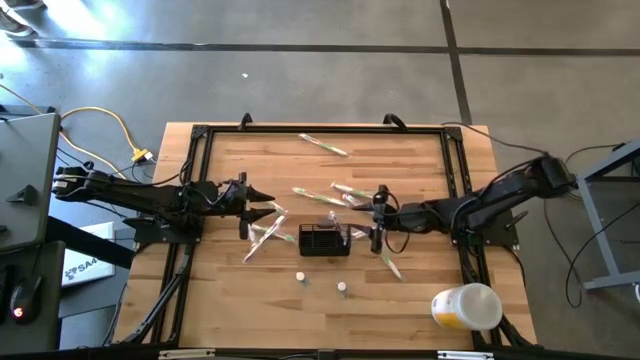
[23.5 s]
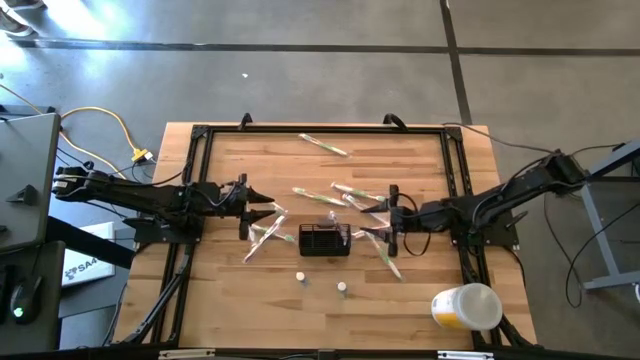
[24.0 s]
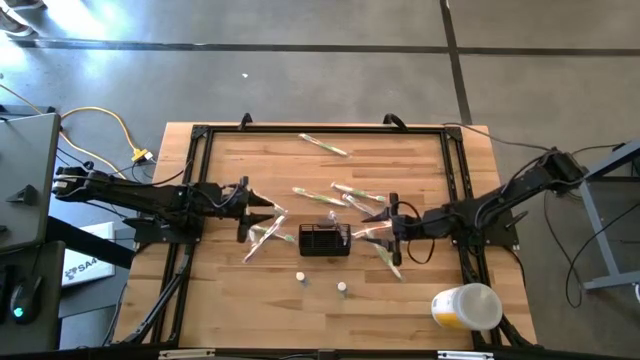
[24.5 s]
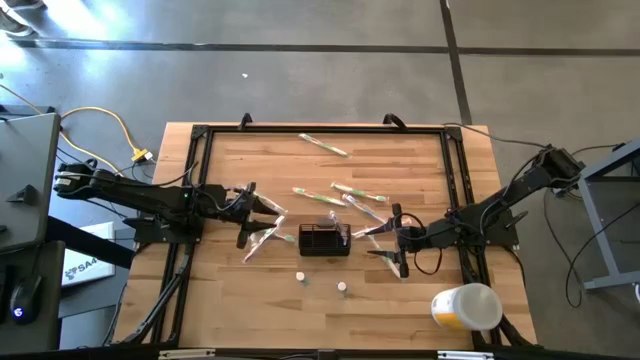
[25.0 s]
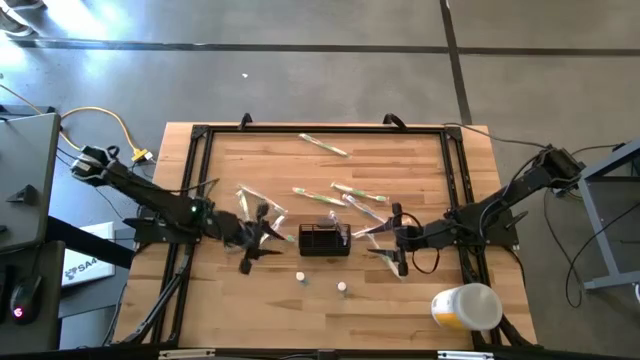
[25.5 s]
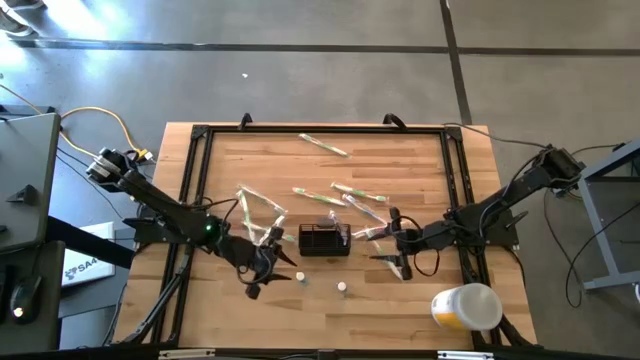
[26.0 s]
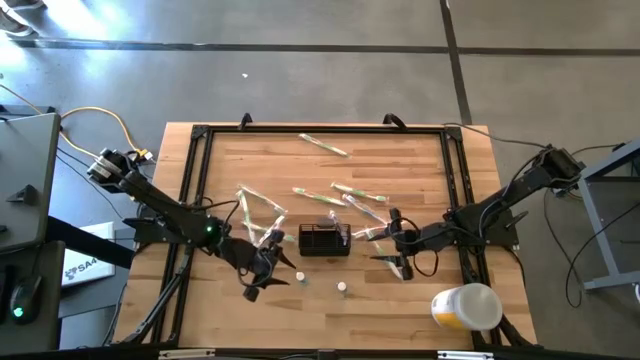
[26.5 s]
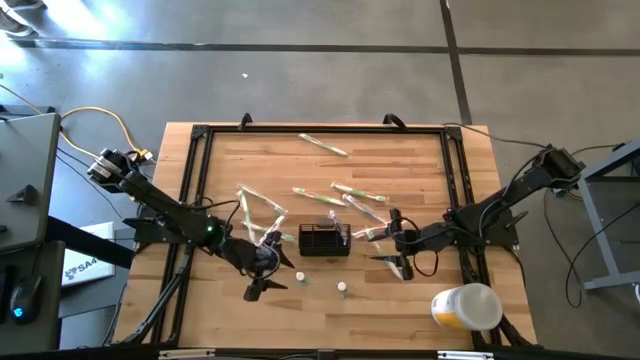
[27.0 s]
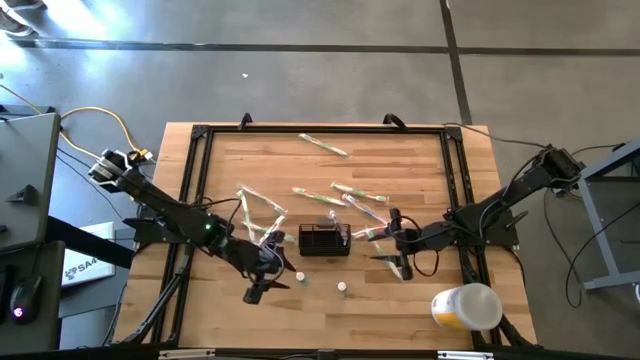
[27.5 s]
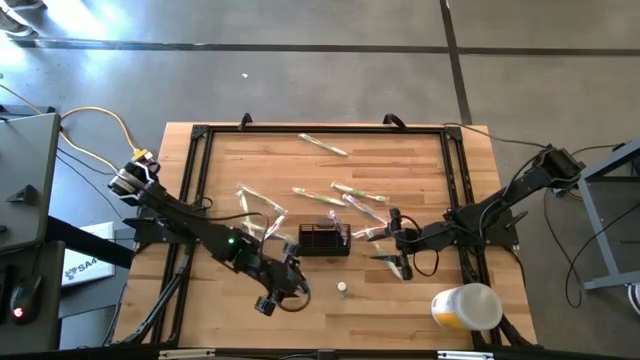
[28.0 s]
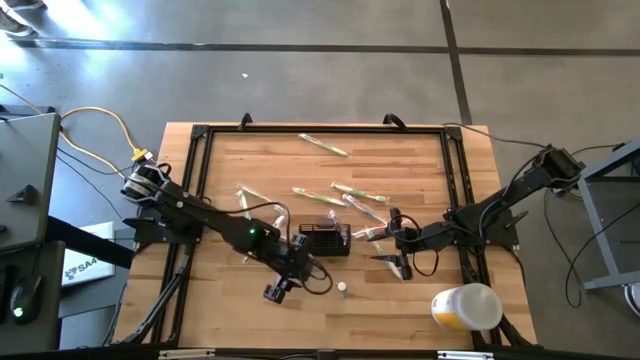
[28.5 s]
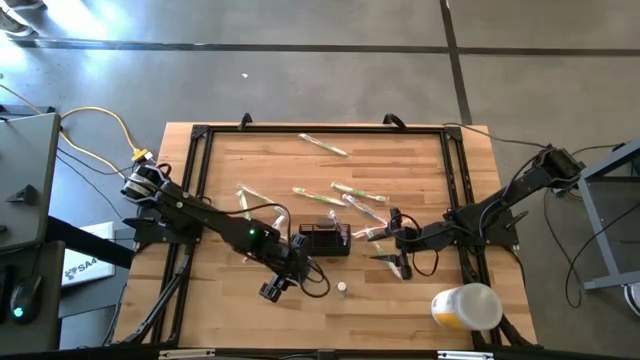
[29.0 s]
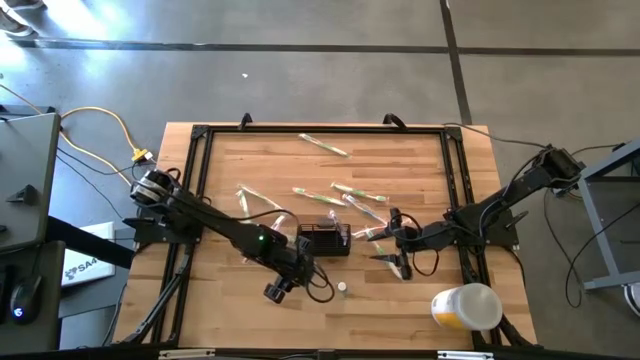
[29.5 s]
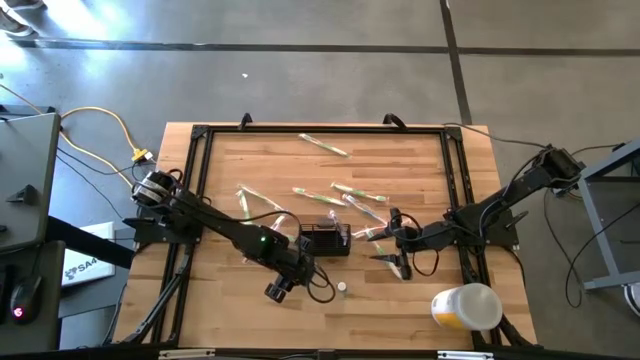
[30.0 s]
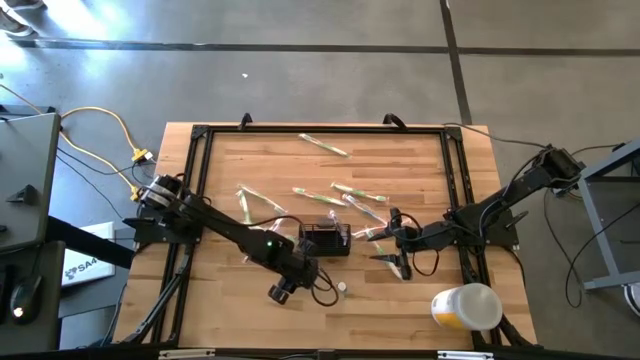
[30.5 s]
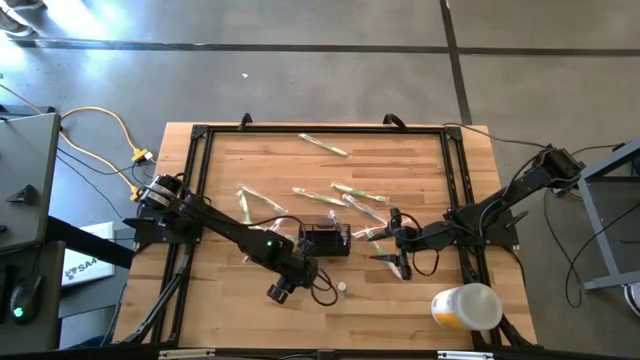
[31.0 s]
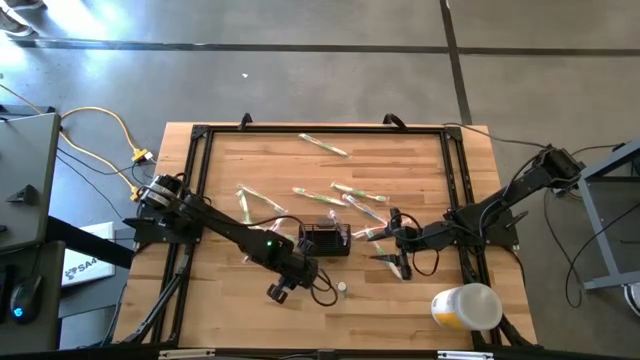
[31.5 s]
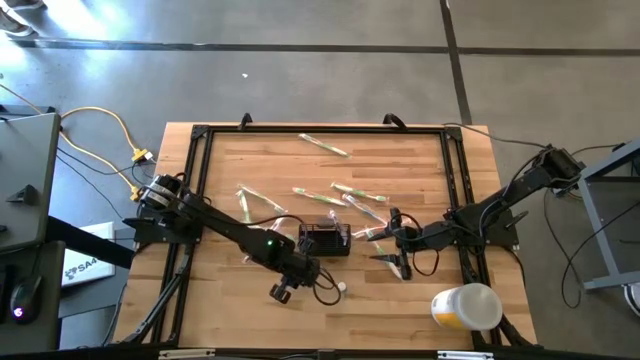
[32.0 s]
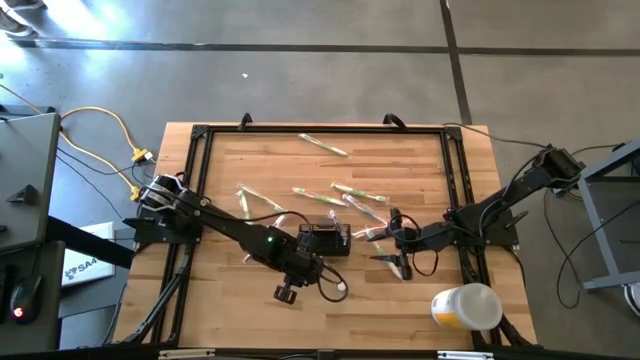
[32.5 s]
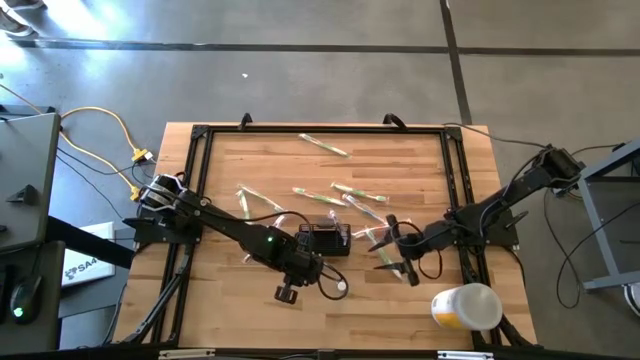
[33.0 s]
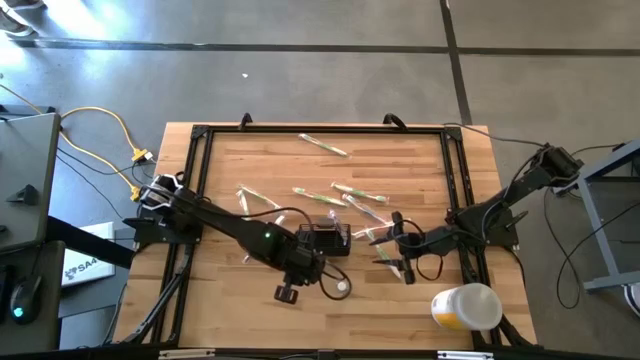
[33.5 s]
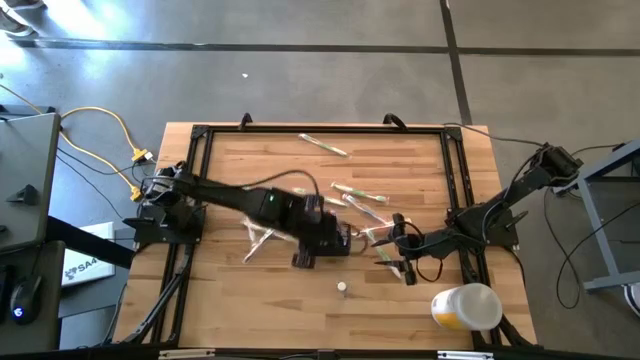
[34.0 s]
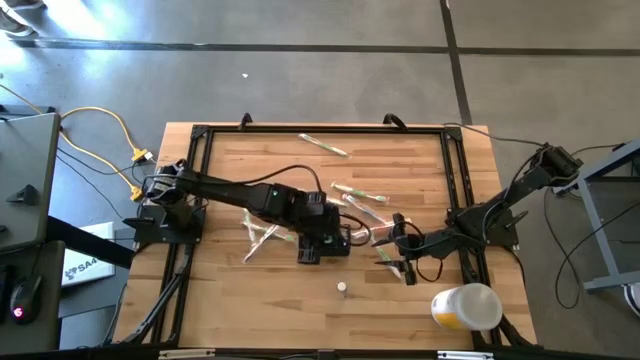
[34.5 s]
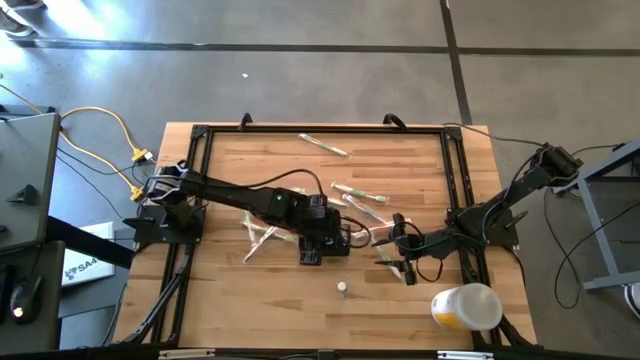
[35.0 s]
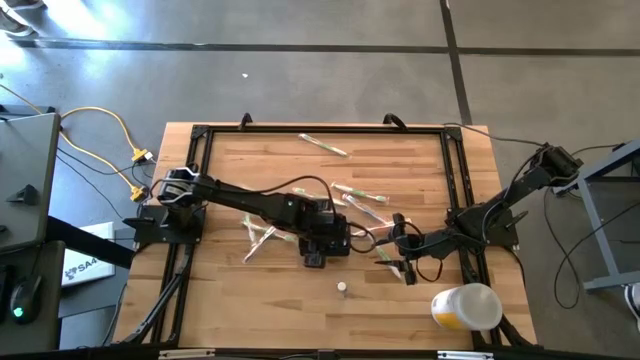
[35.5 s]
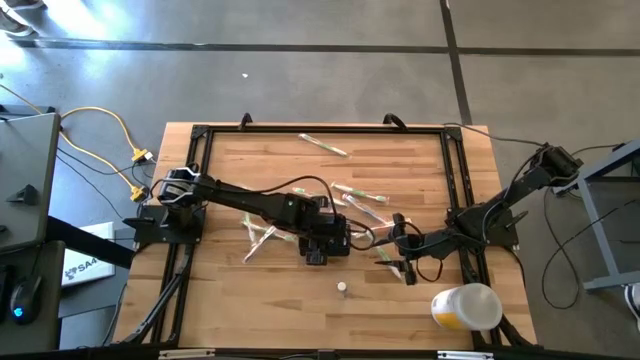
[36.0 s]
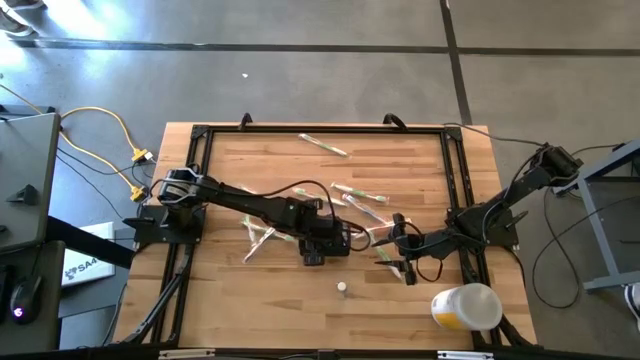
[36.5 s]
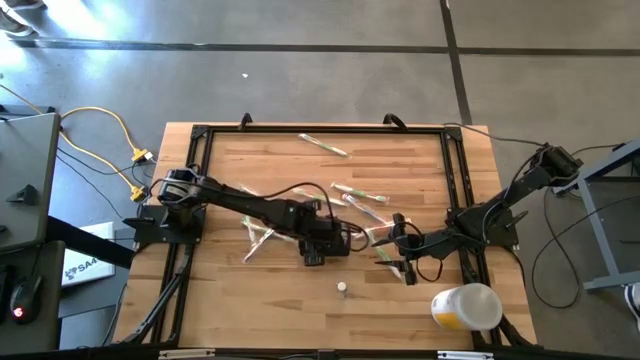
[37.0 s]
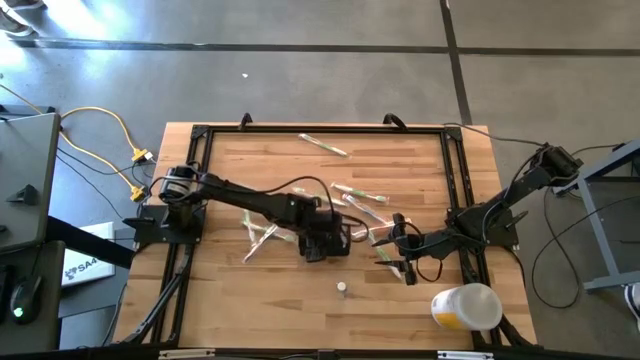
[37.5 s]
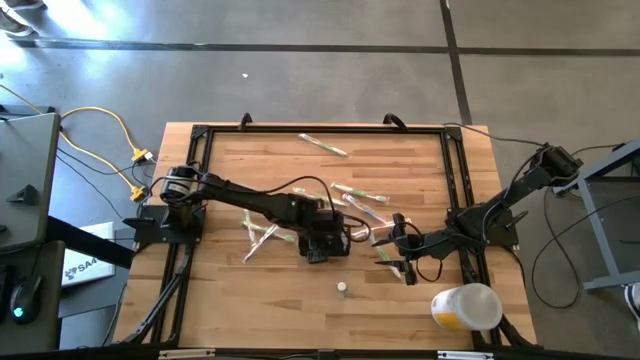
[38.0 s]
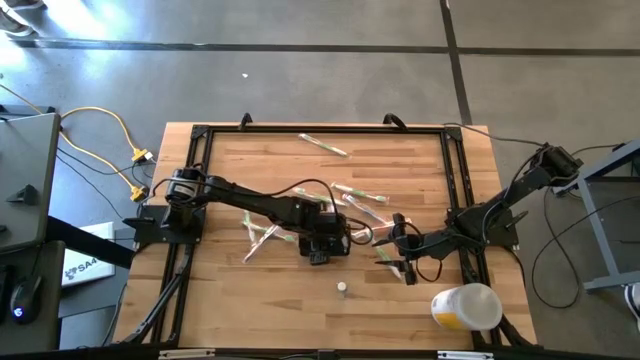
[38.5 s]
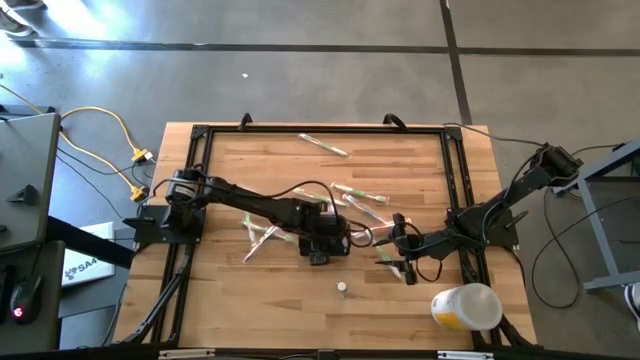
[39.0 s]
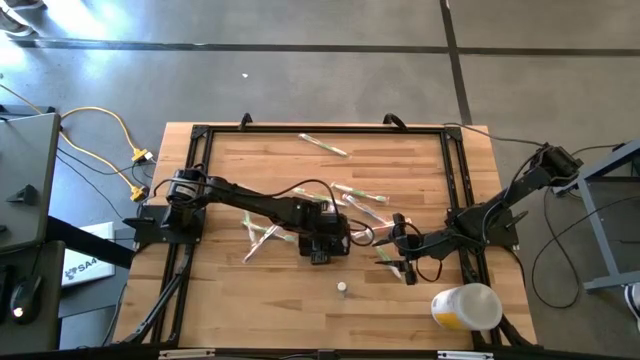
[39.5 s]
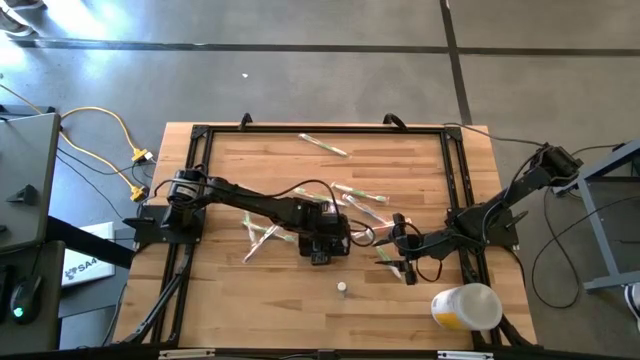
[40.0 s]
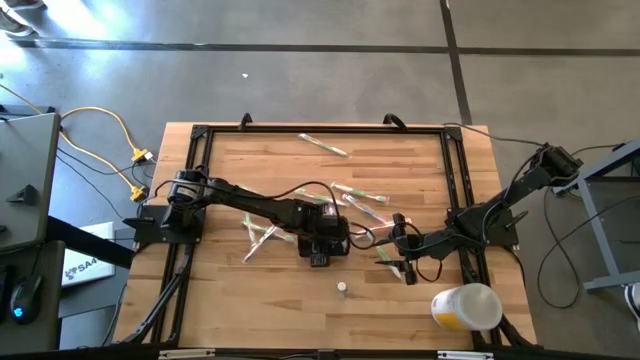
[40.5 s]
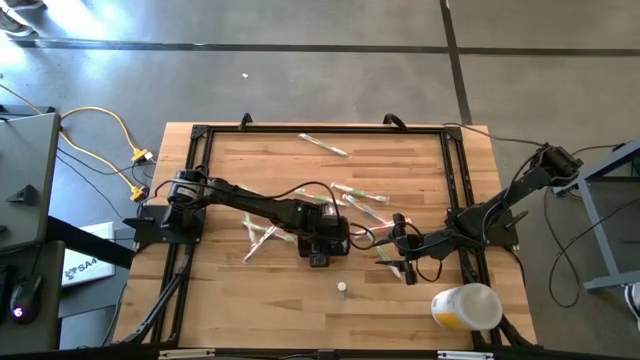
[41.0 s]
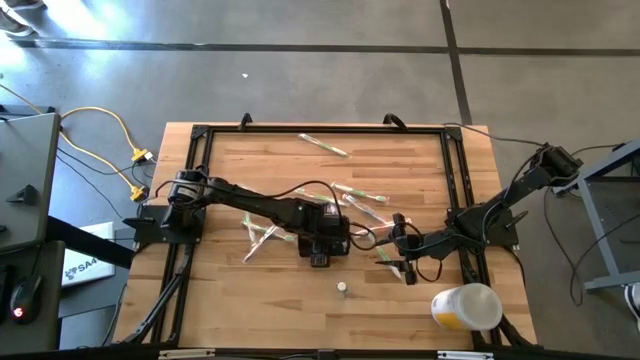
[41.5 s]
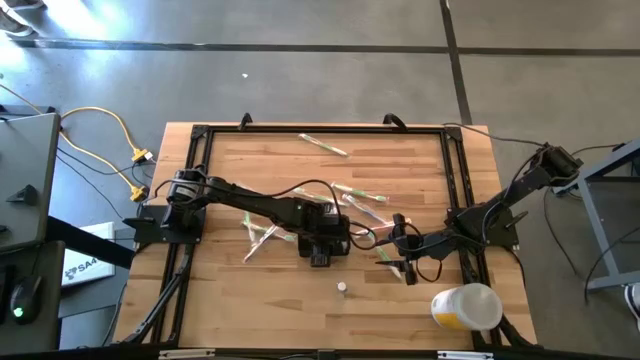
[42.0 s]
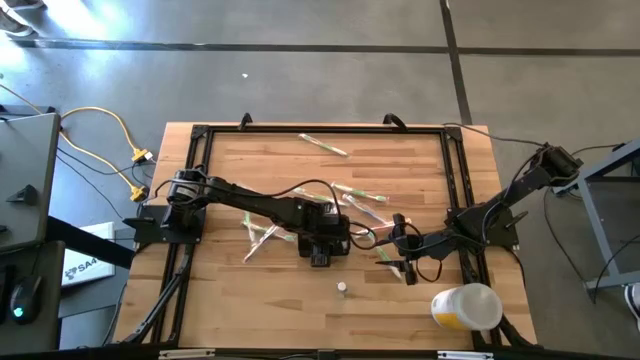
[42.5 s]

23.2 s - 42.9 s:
Task: Pick & Place toothbrushing station
Put the mouthwash into the wire organizer

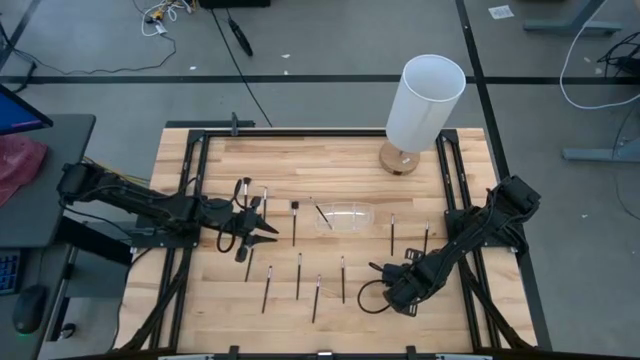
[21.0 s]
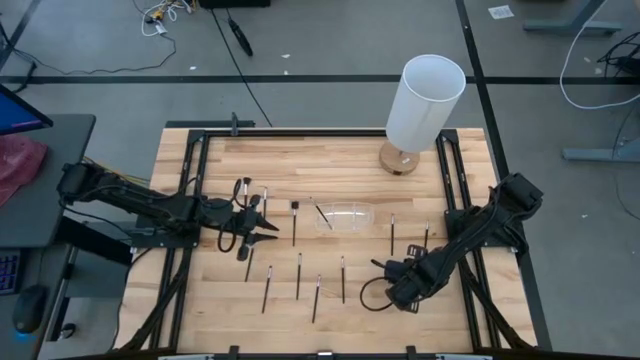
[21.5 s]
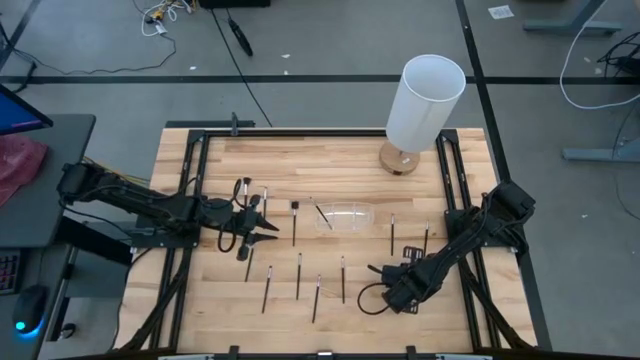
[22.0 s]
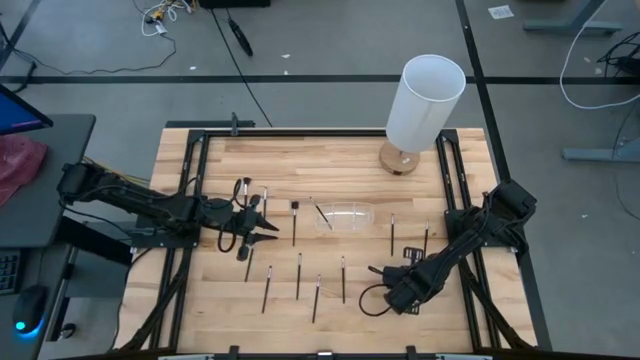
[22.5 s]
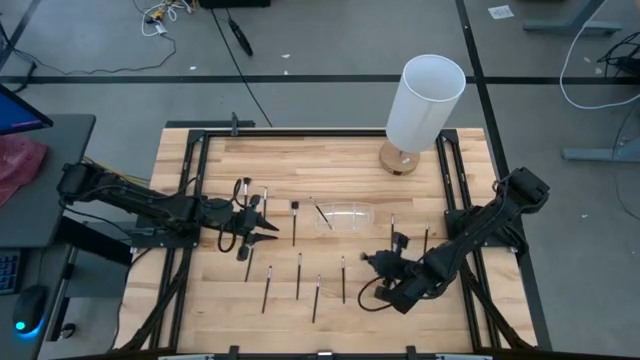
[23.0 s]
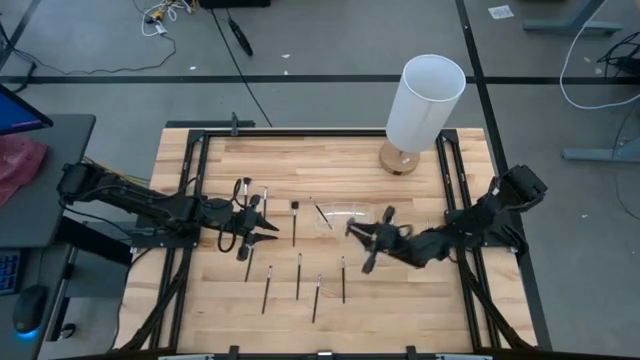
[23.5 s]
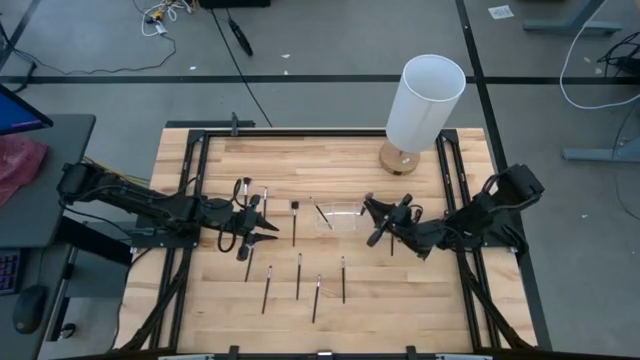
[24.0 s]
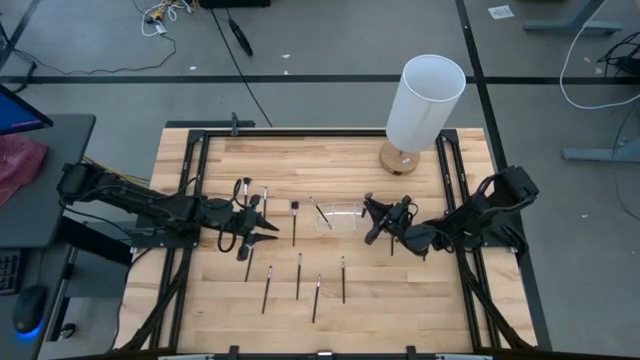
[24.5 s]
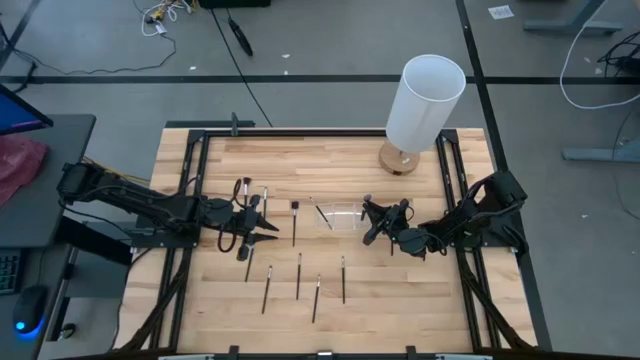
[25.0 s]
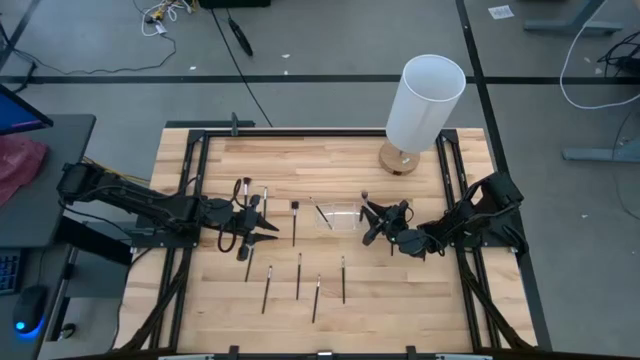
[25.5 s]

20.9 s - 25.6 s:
Task: Pick & Place Makeup Supplies
Put the black makeup brush into the transparent organizer
